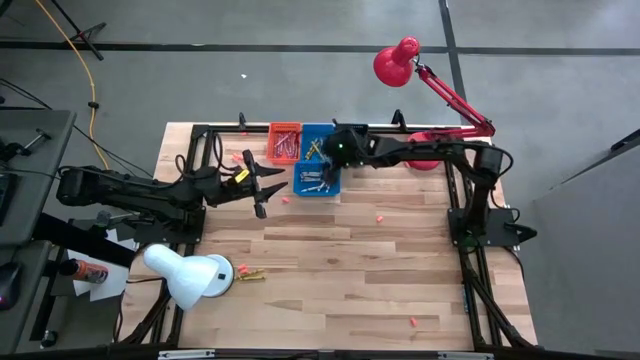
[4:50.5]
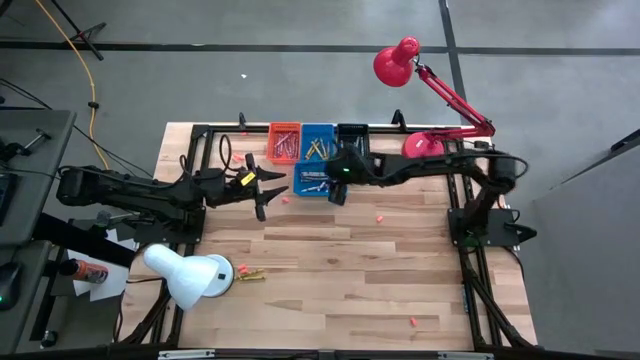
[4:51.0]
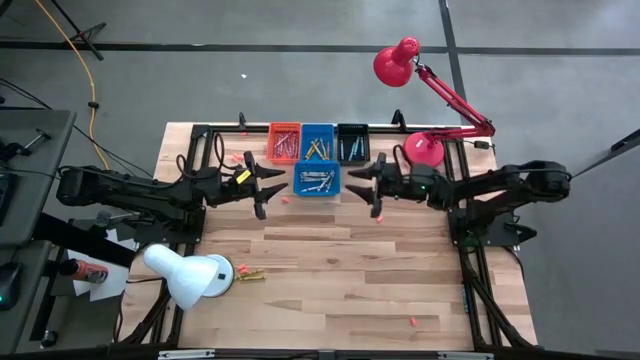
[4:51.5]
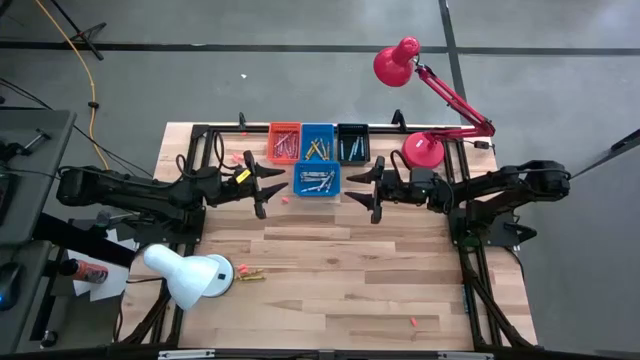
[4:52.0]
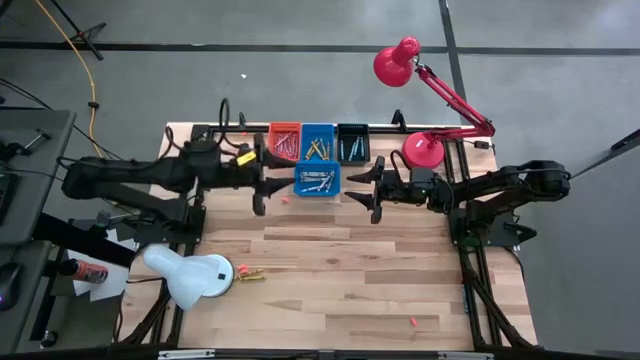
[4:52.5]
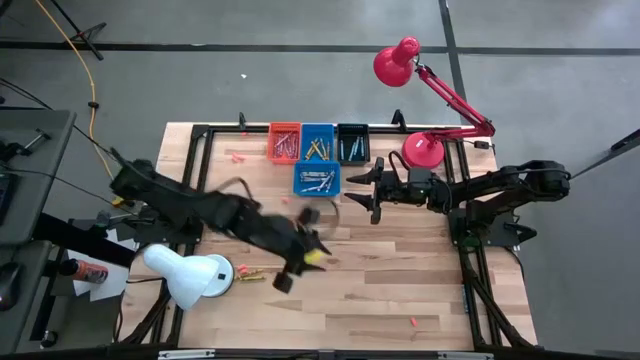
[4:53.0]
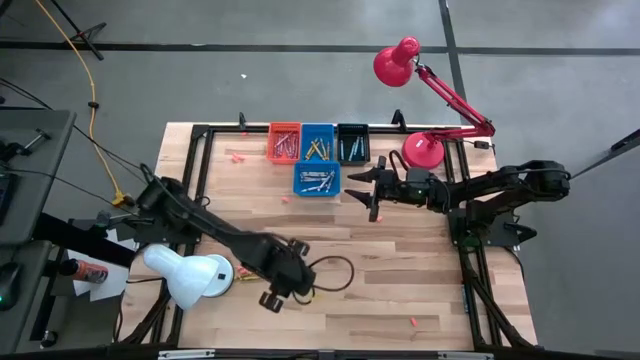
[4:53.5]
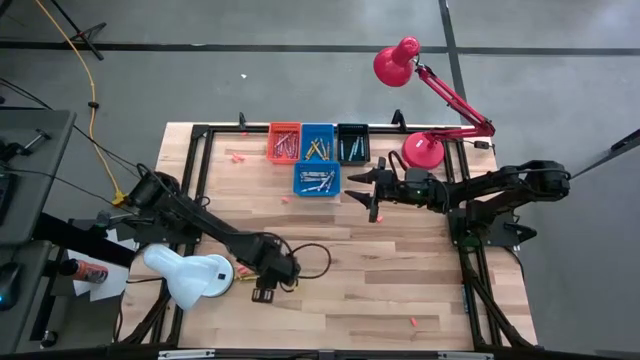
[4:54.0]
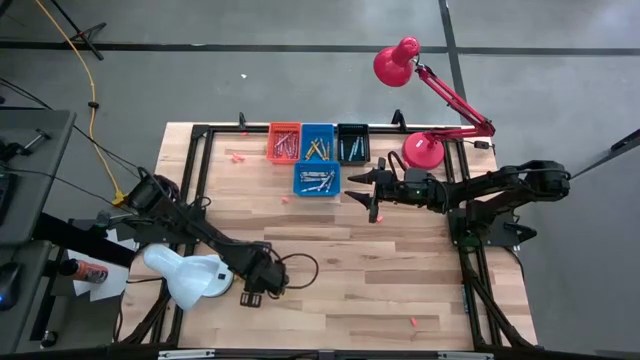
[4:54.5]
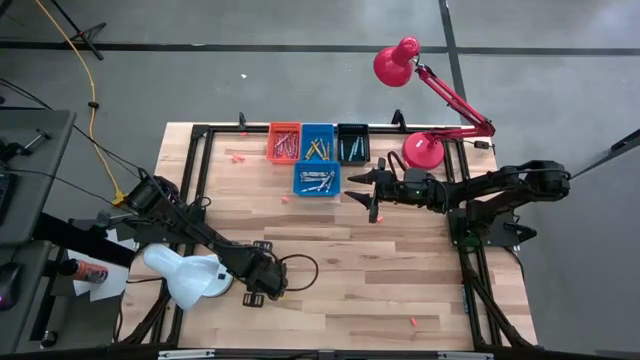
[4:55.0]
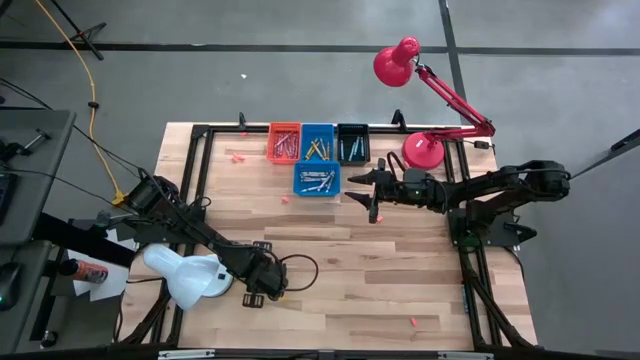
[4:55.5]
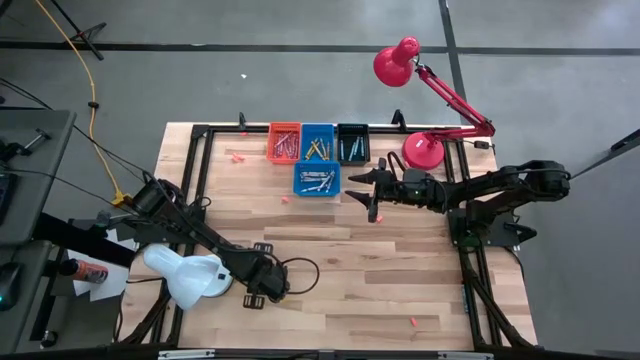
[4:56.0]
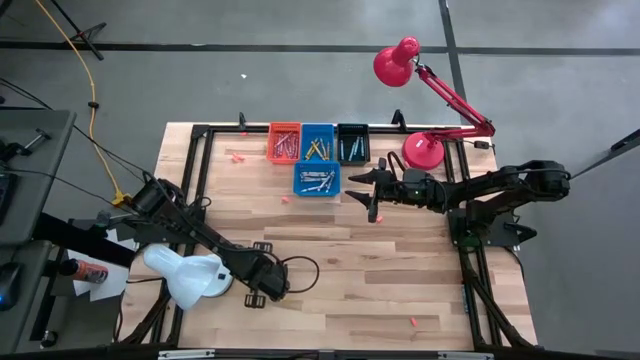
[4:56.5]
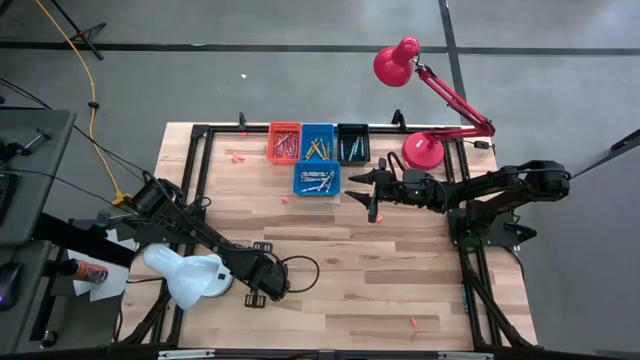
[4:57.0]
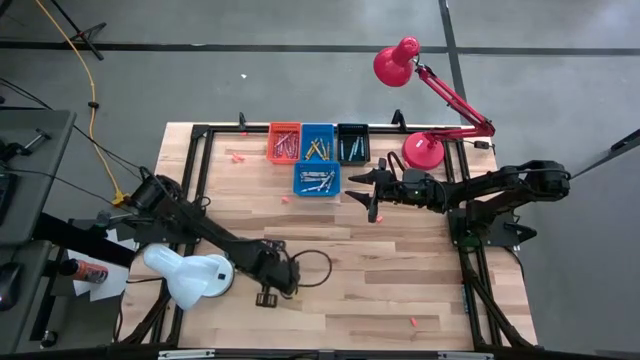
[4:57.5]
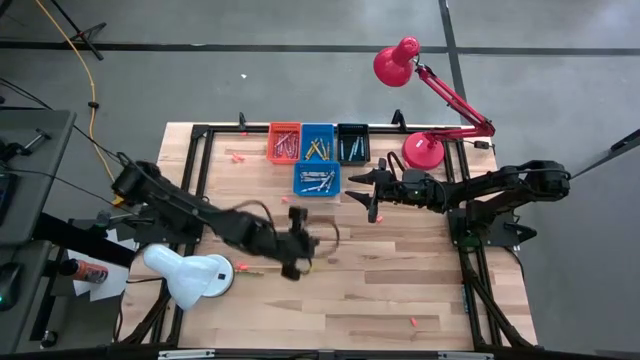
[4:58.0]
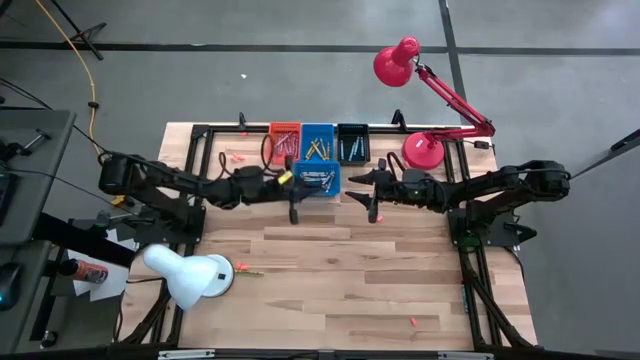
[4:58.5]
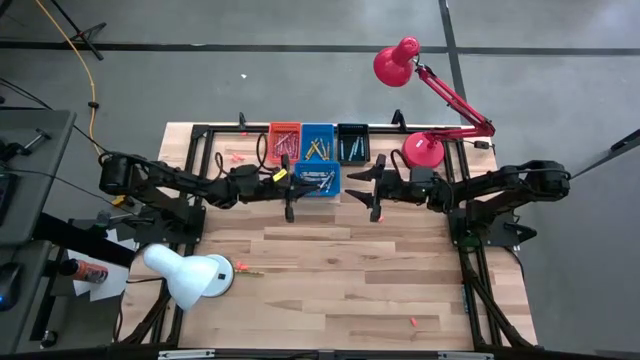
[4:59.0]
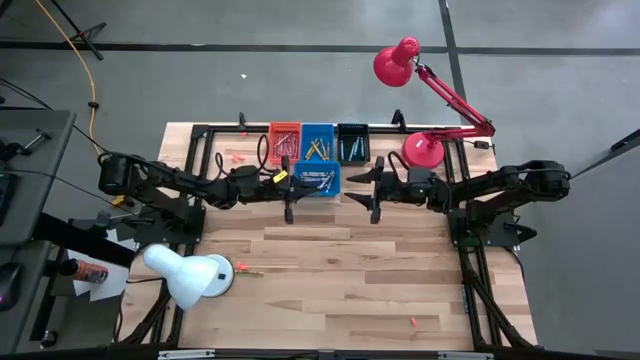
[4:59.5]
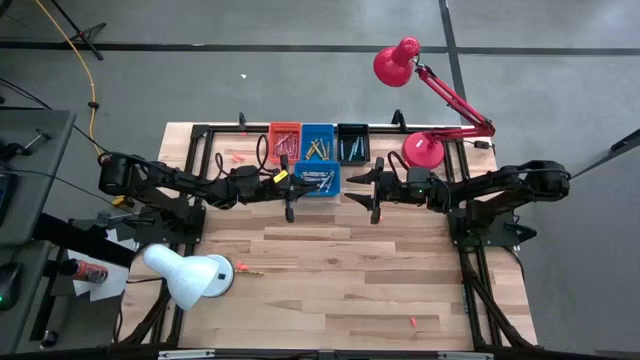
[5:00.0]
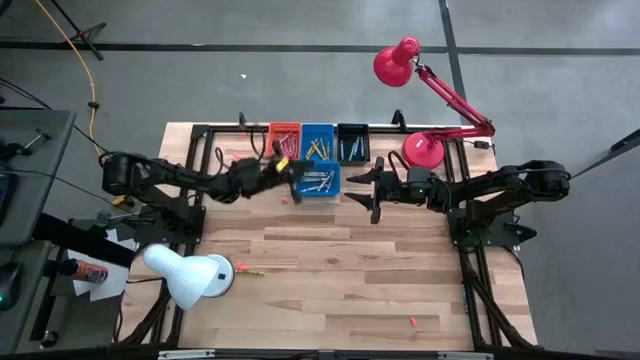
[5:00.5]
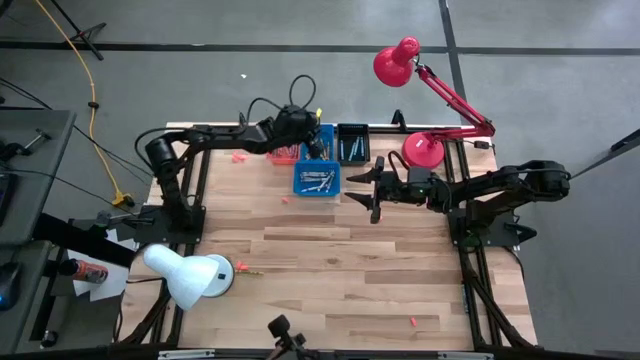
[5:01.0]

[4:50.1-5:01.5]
Task: Sort crayons
Put the yellow crayon into the top blue bin

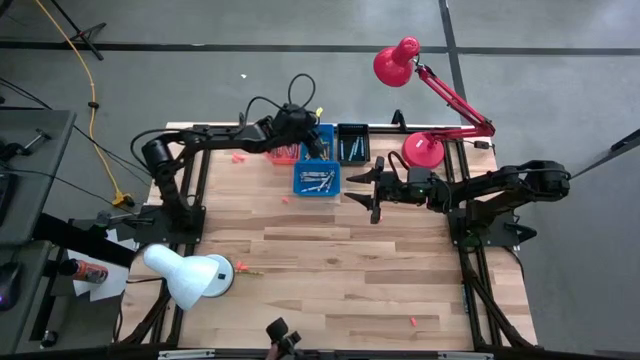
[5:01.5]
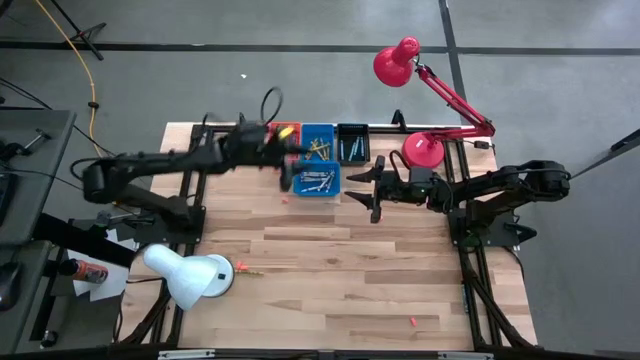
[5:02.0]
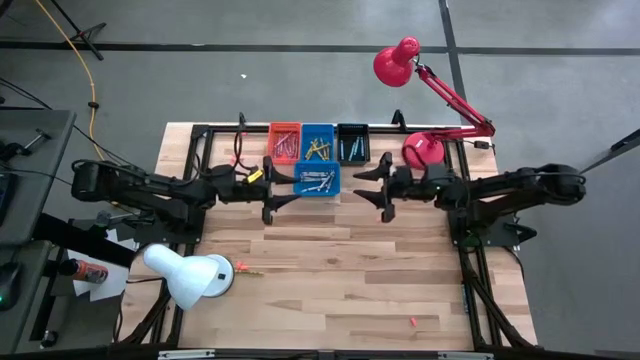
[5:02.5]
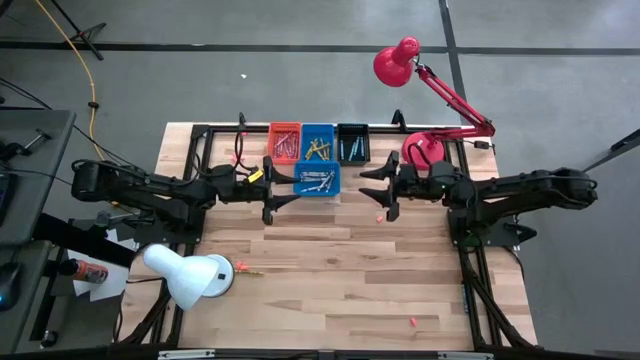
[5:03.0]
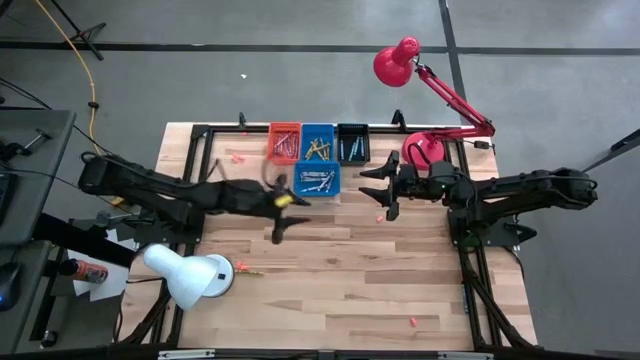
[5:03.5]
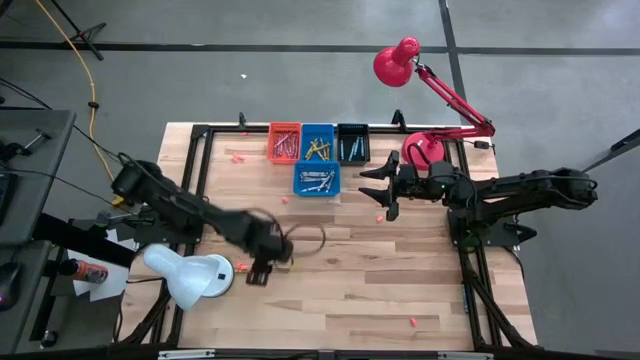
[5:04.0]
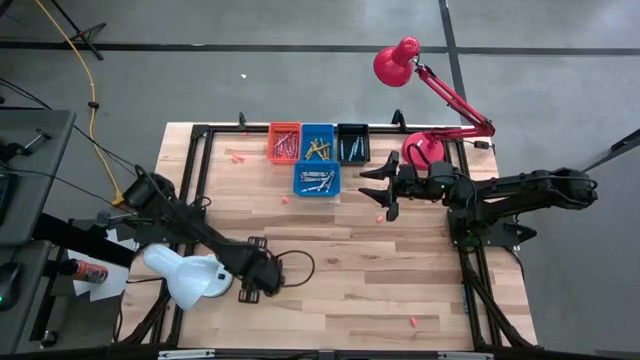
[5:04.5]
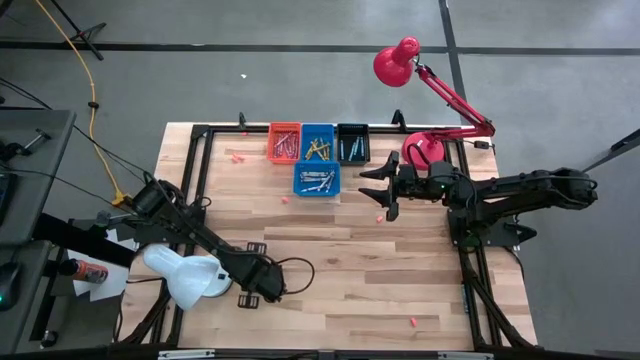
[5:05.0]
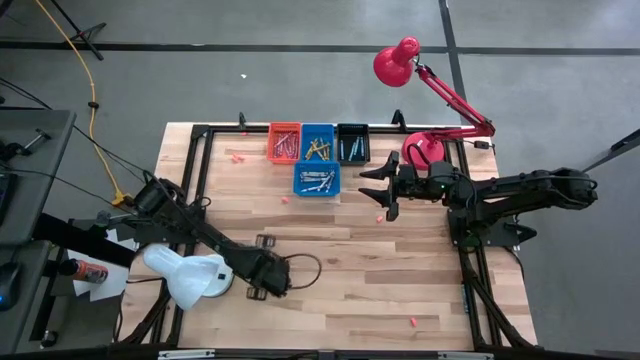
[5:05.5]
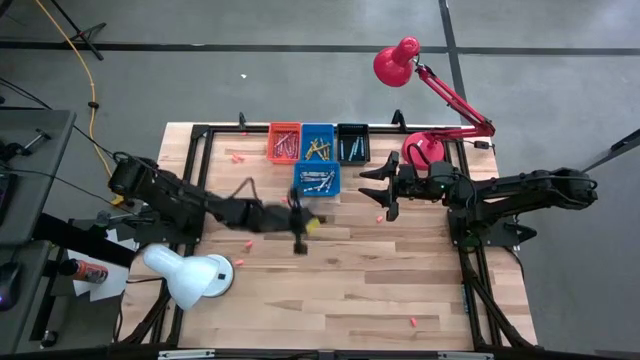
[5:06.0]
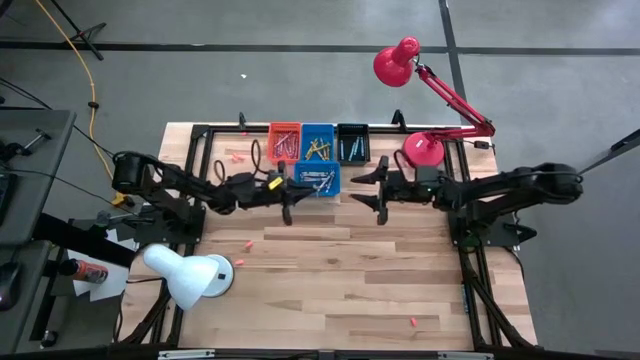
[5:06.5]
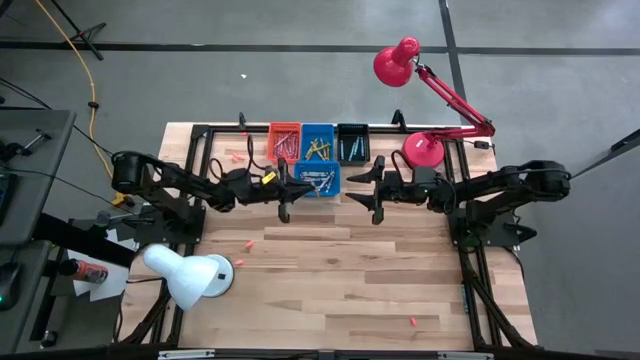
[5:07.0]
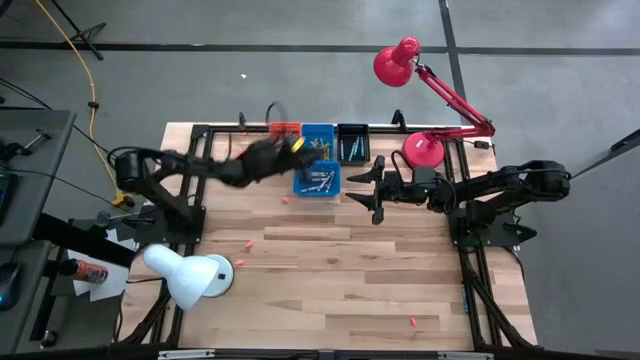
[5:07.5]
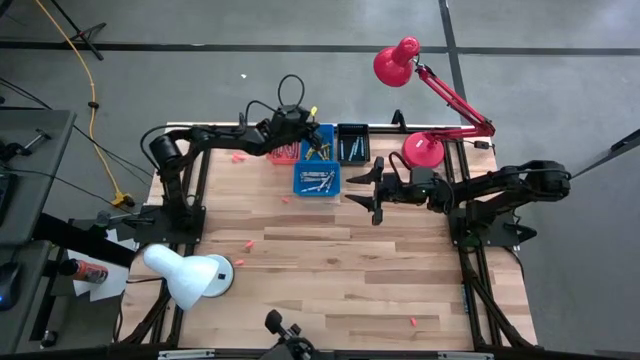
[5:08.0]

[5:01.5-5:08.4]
Put the yellow crayon into the top blue bin

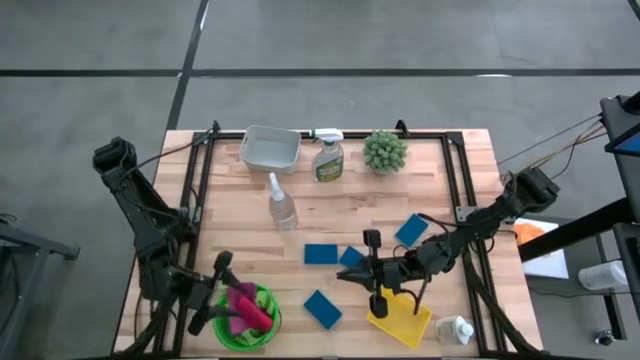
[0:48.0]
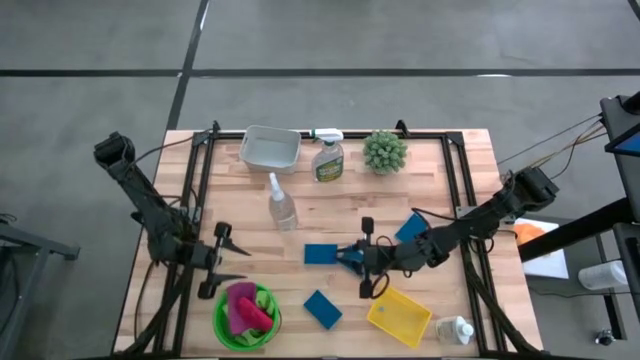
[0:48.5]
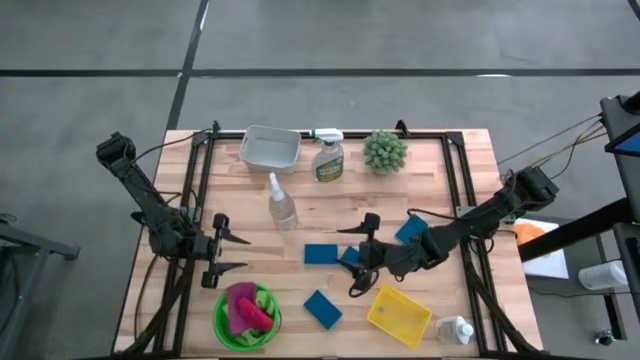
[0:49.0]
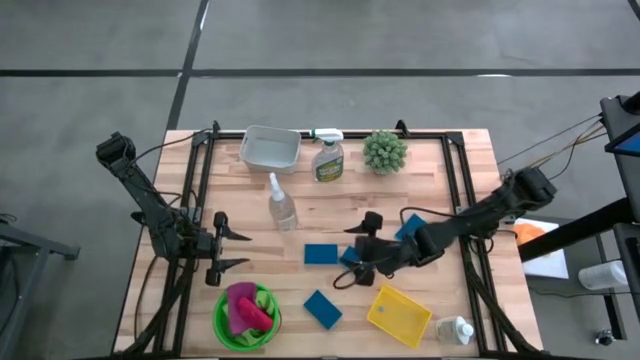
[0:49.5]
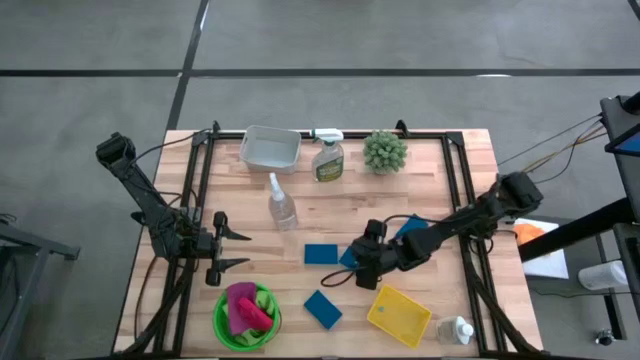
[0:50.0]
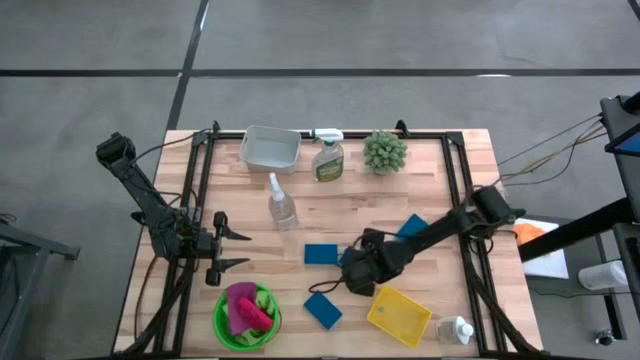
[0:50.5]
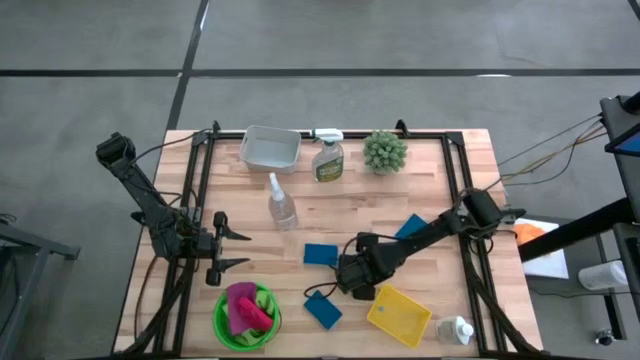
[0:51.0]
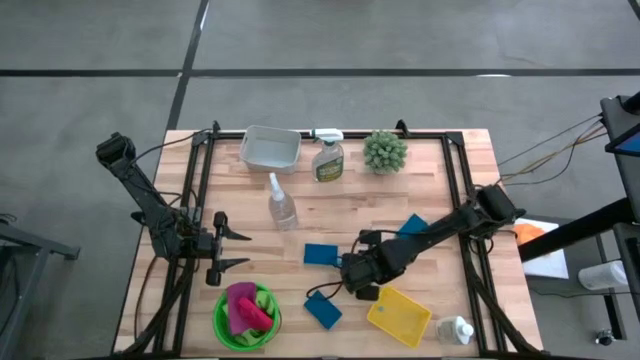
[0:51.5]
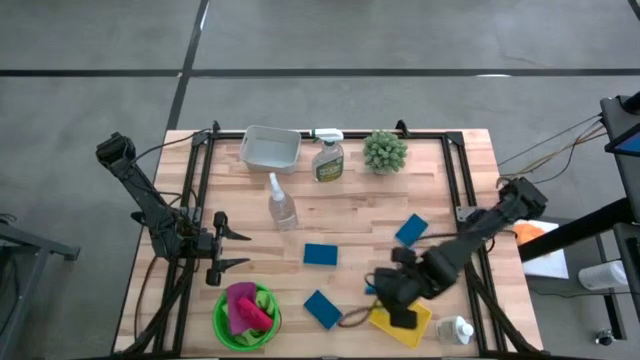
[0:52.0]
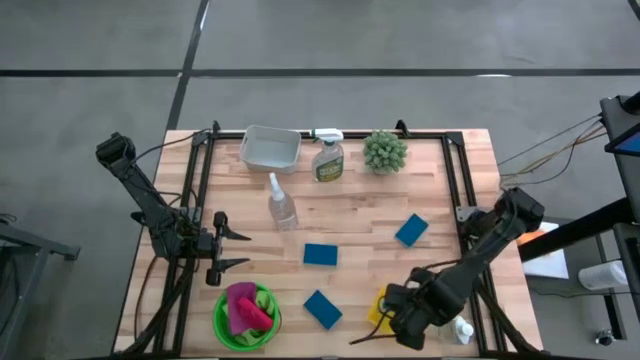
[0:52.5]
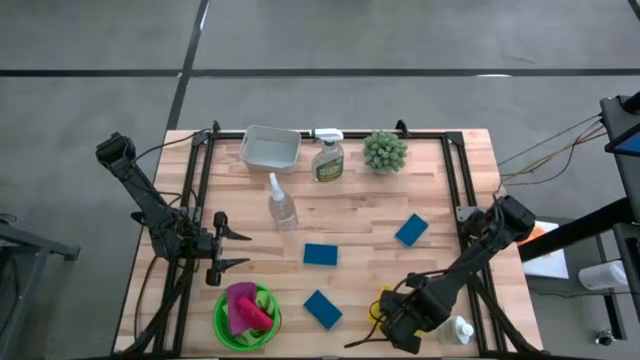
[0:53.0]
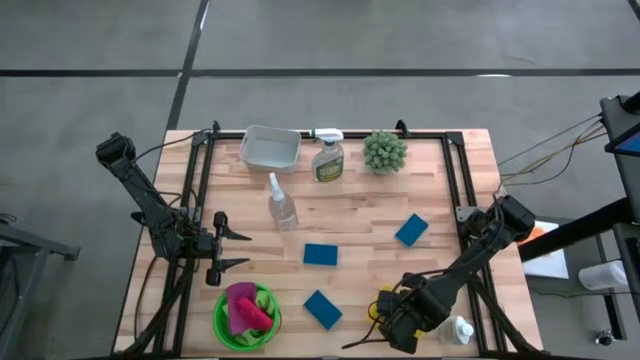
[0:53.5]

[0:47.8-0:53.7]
Task: Pick & Place Kitchen Items
Put the blue sponge into the yellow bin
